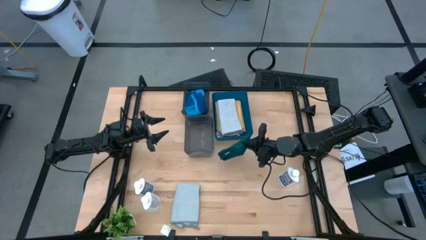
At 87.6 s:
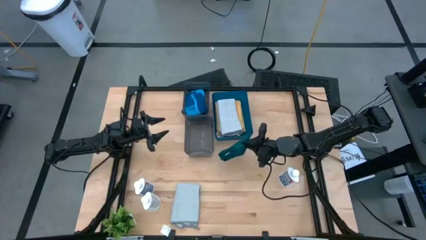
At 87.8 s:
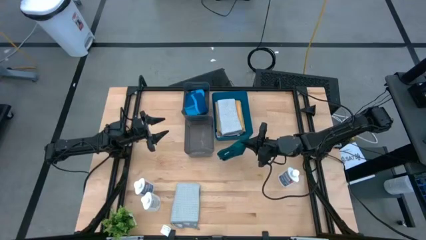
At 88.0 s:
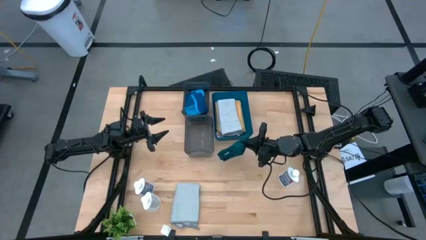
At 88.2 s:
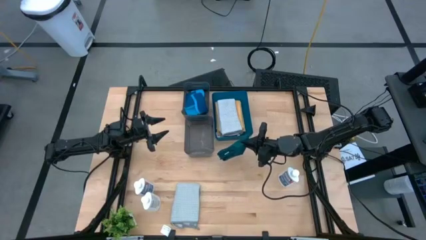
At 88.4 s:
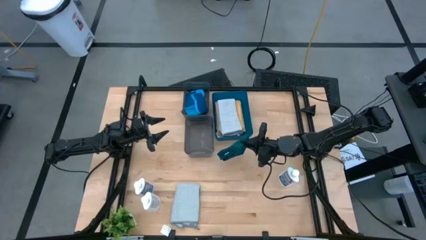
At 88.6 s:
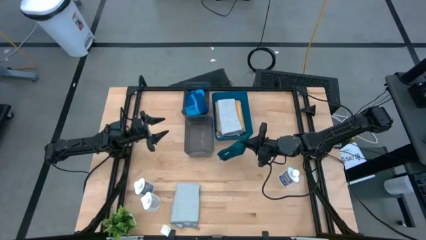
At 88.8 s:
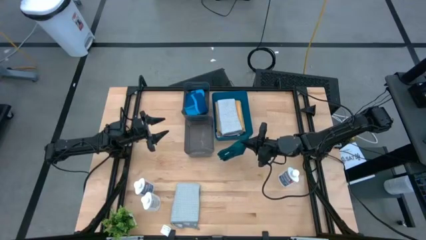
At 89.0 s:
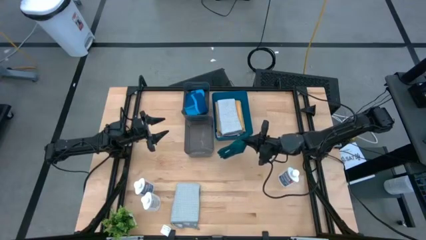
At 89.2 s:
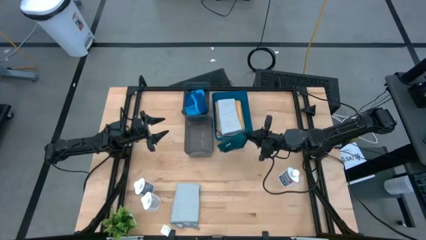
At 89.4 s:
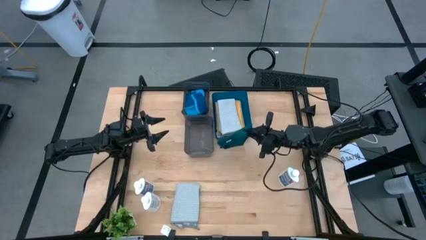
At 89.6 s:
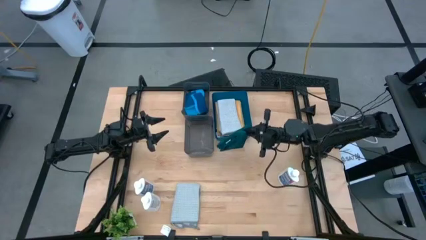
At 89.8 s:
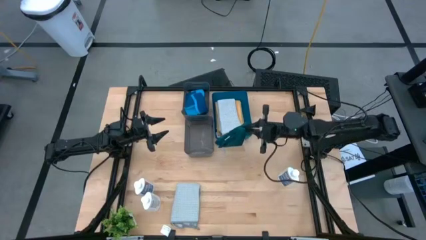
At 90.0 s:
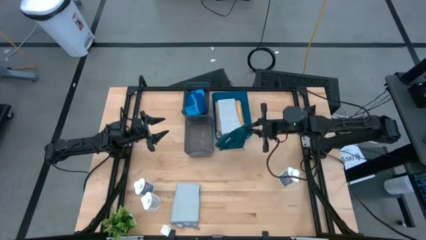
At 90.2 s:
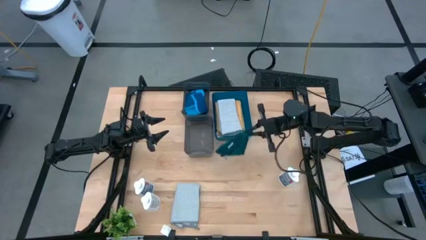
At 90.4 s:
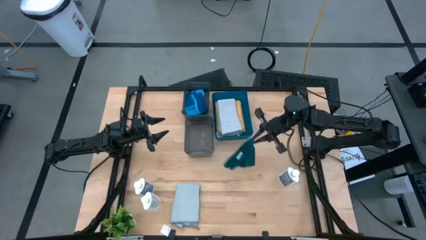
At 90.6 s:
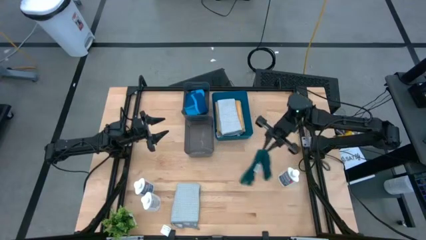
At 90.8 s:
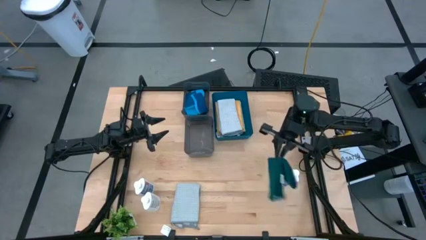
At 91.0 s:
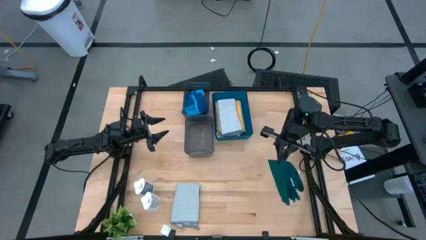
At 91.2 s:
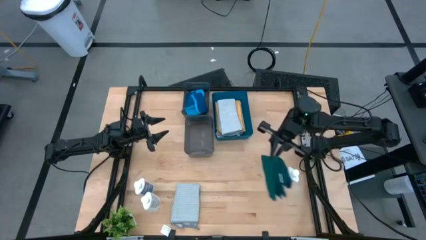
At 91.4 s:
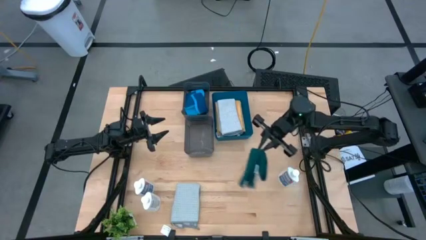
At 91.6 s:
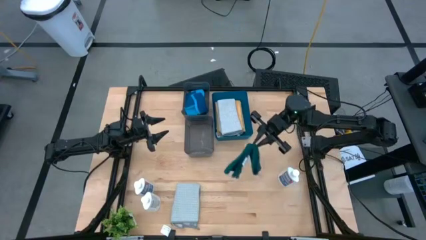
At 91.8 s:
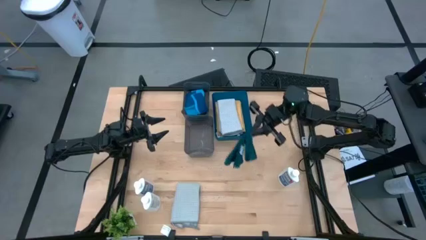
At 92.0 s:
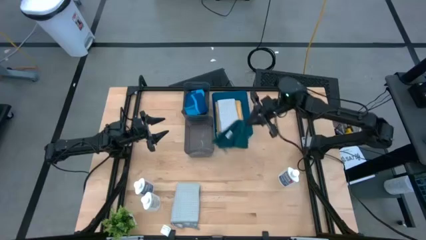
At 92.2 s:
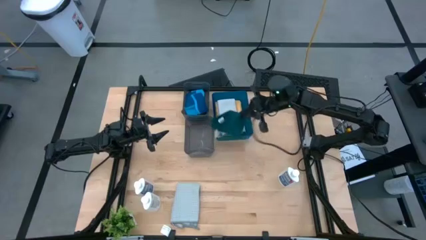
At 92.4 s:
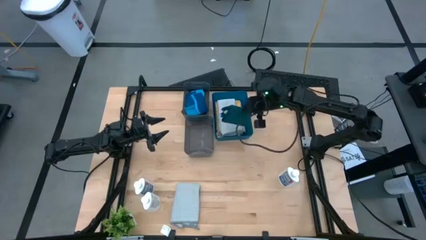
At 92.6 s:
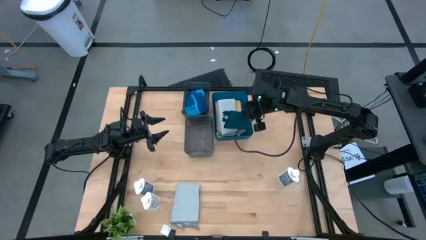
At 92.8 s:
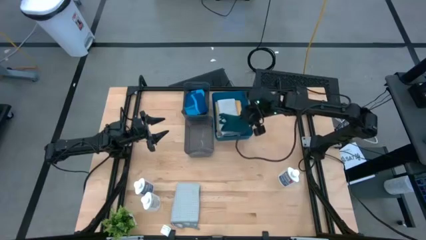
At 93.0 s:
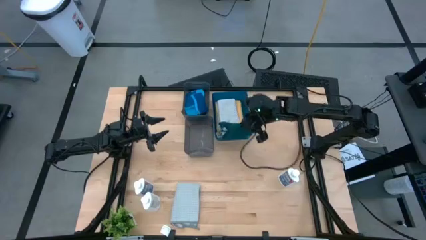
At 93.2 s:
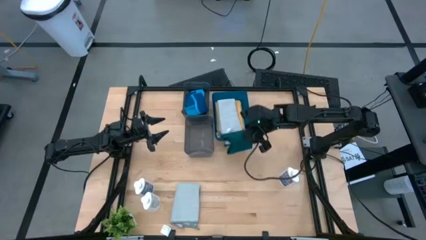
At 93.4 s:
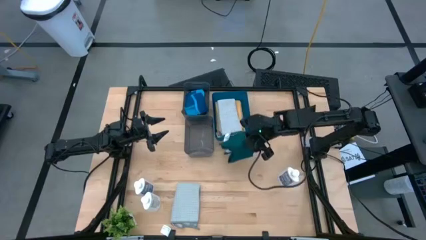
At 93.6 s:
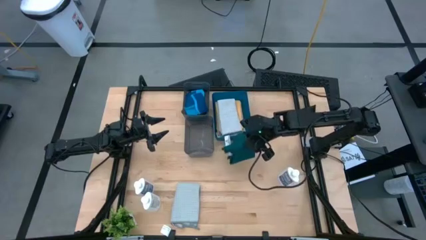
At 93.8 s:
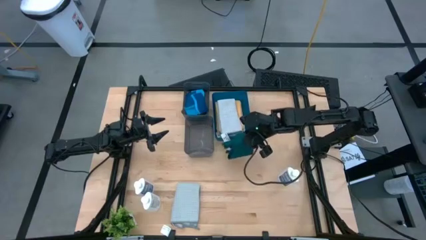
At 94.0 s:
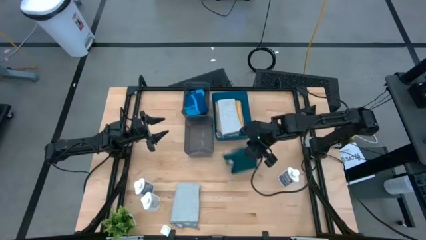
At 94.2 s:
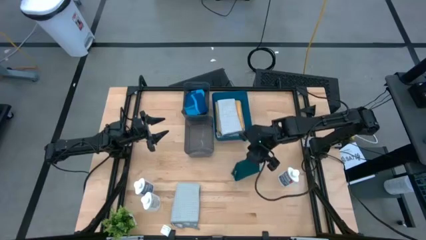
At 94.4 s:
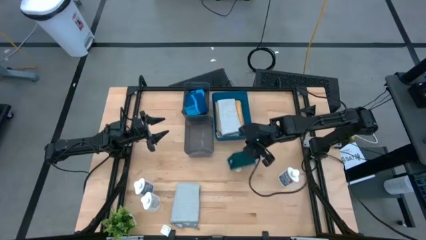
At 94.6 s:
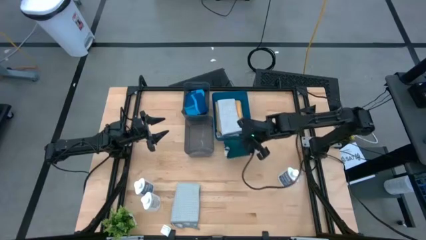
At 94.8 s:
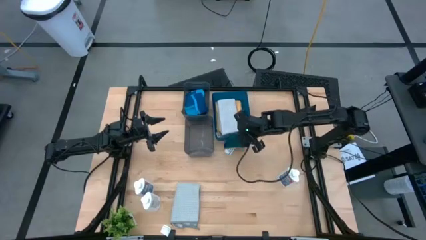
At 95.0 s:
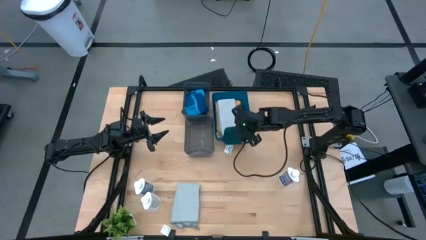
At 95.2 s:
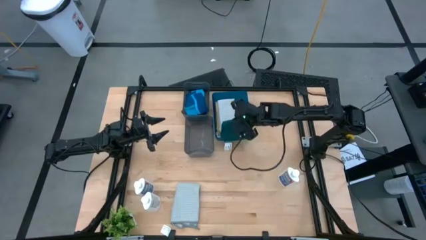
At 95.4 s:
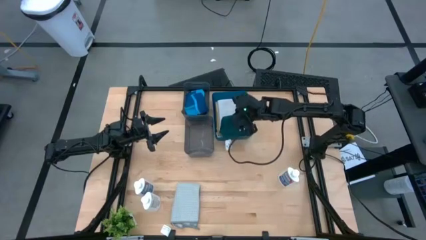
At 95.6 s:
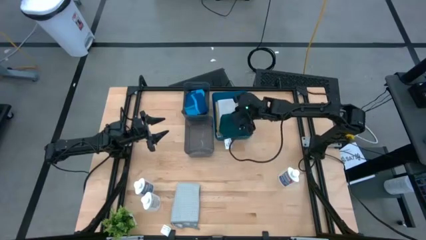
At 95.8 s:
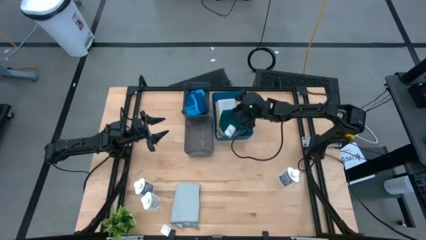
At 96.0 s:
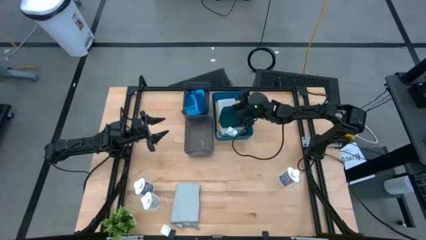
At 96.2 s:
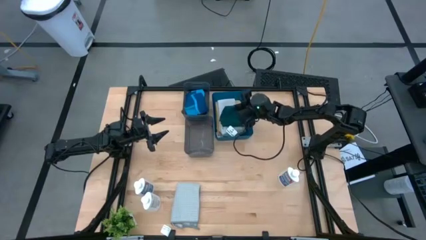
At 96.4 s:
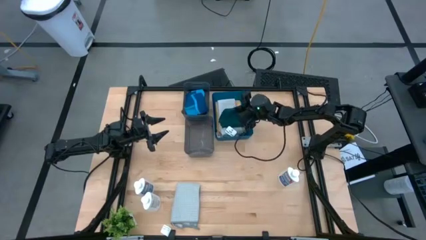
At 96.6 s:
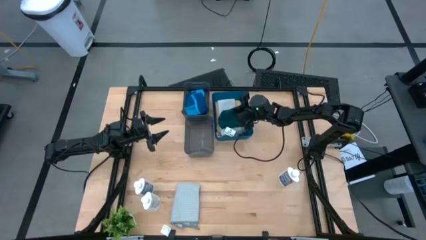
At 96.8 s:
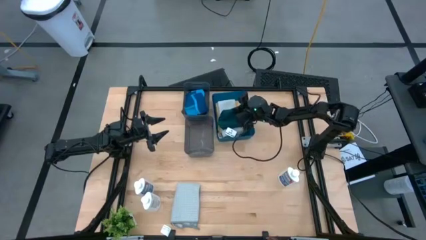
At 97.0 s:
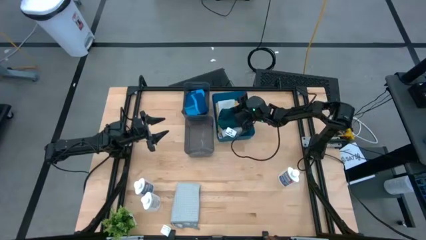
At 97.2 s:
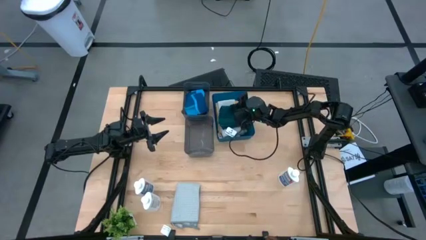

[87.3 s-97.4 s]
Task: Pick & Place Kitchen Items
Put the green towel into the blue bin
